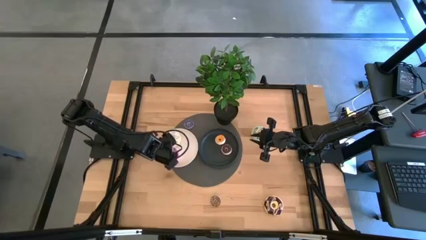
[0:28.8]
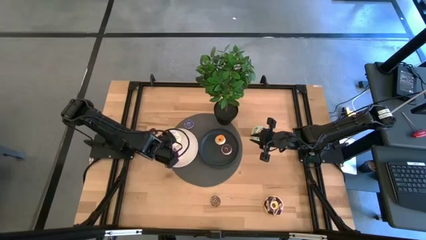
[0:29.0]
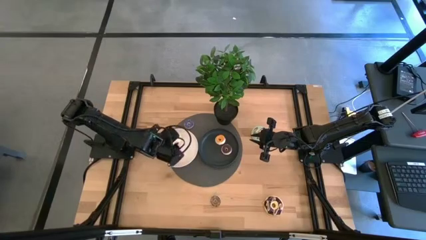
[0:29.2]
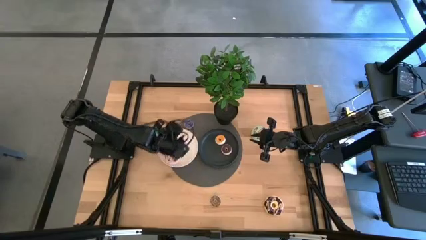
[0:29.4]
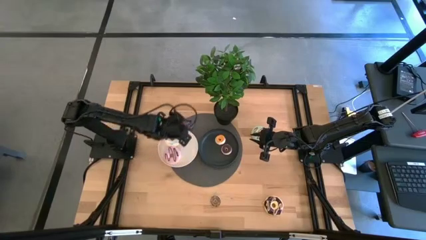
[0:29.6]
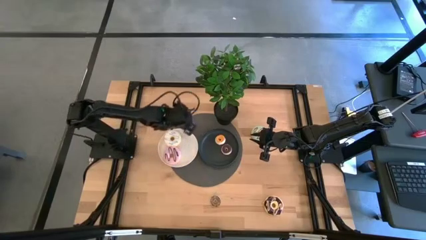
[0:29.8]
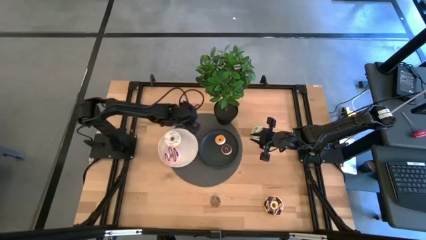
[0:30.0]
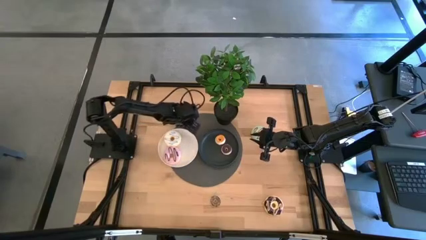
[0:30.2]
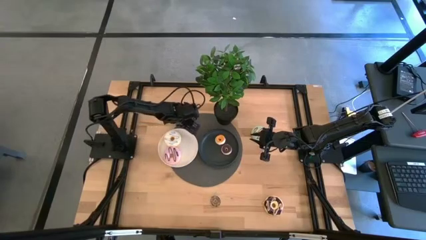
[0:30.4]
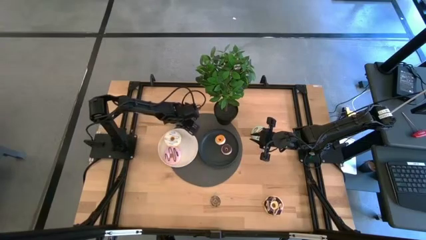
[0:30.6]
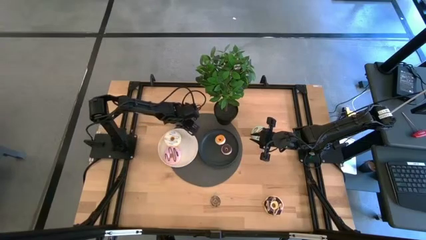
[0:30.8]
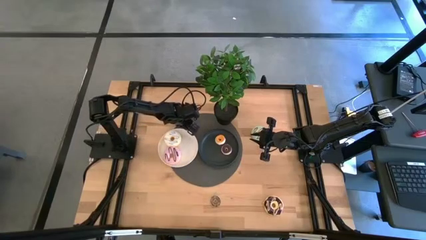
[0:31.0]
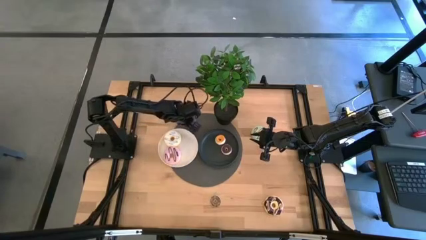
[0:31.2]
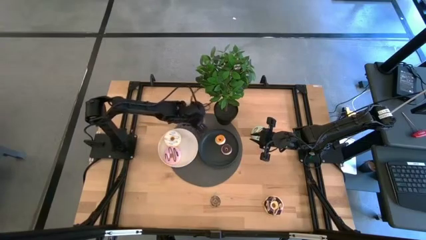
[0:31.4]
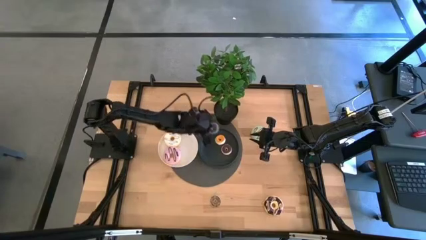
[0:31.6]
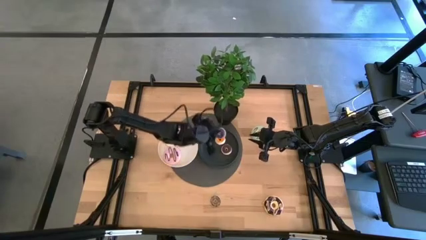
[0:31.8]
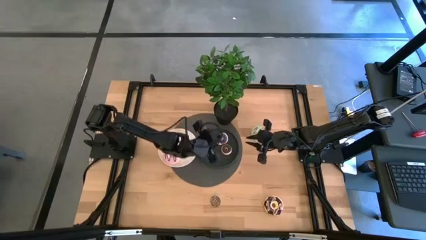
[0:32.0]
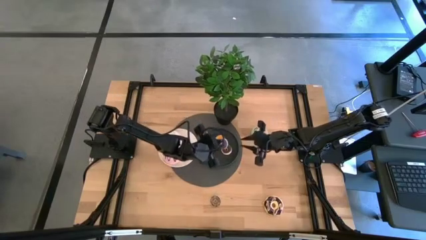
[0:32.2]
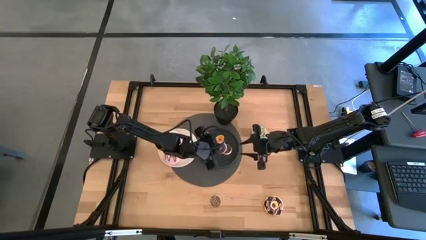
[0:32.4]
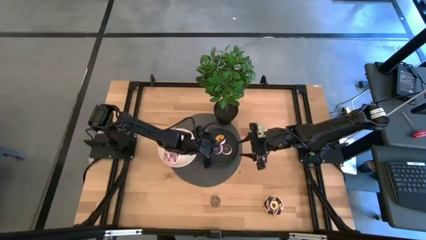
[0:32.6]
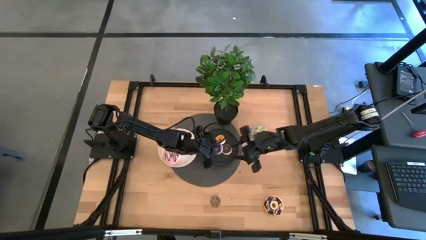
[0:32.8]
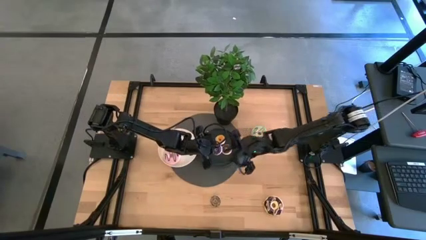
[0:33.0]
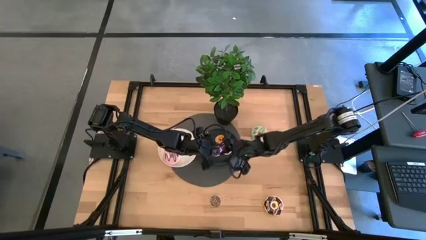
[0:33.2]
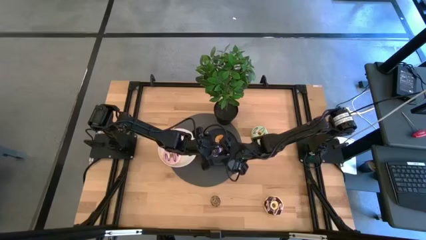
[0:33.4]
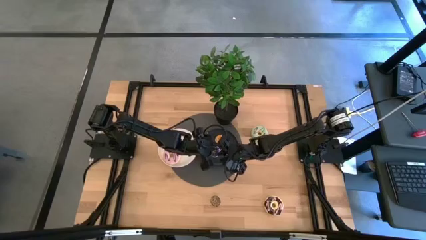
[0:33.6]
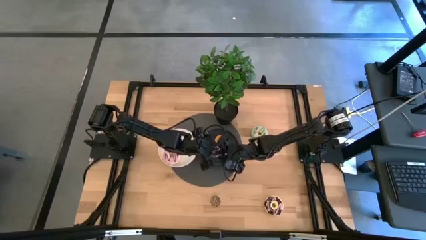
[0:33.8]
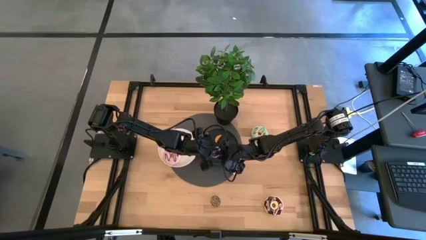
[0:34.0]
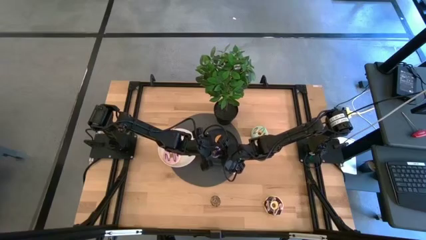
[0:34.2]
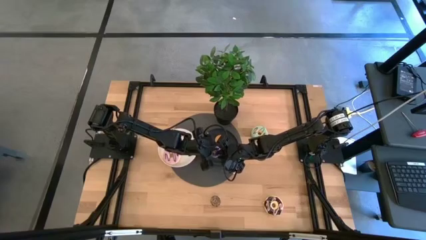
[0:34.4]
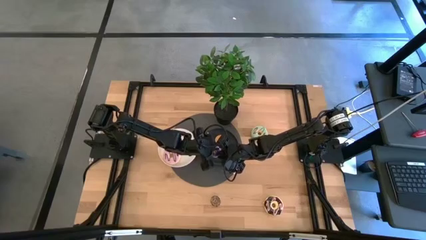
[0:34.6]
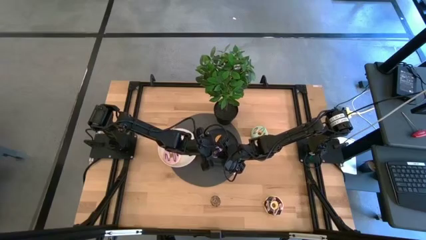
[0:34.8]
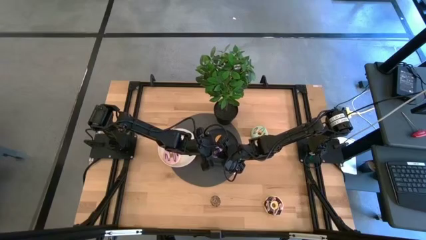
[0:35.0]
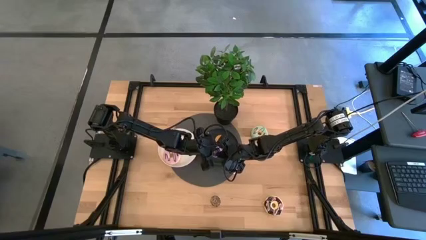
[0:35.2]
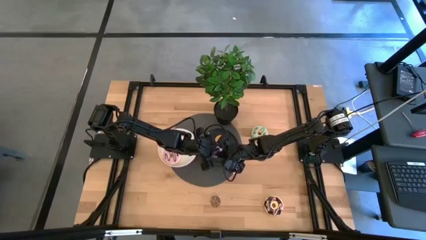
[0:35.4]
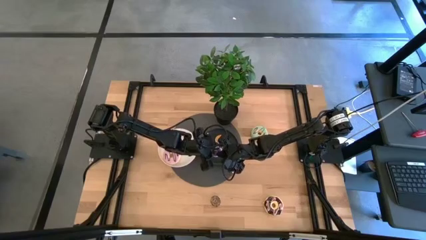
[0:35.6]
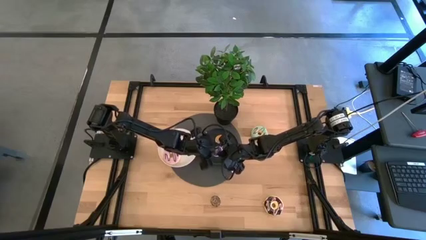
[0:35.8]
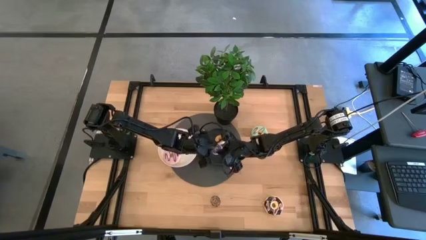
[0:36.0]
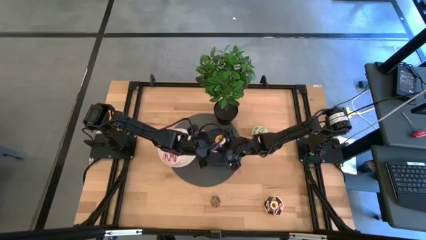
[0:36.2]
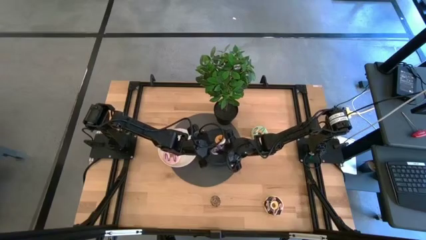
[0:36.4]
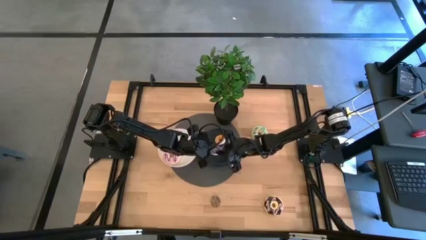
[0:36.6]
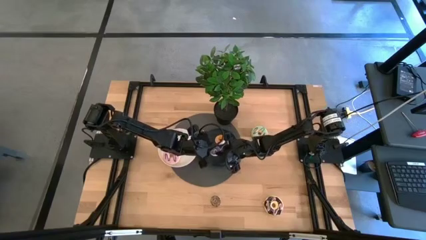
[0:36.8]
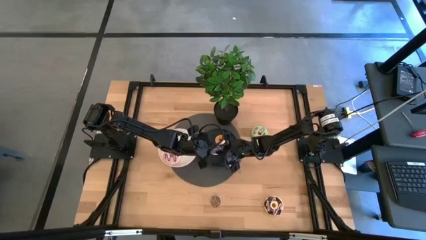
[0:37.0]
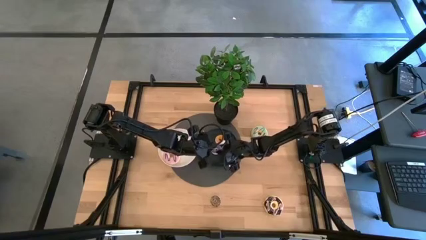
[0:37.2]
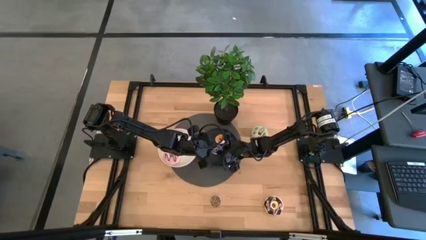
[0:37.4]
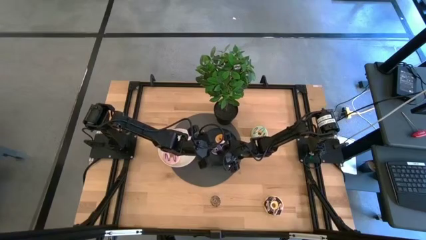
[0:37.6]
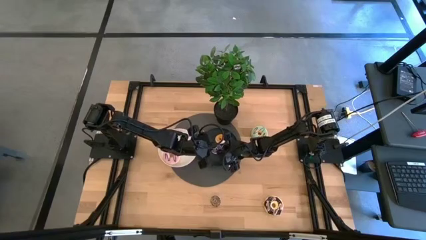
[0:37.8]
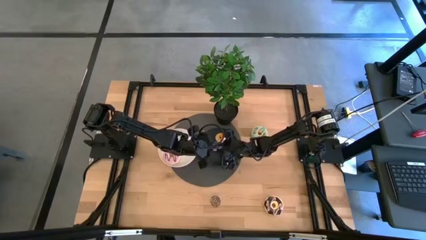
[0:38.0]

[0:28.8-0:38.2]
Task: Pick & Place donuts
Put the small blue donut on the black plate

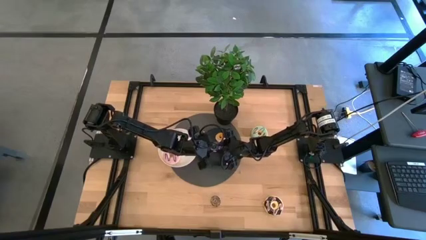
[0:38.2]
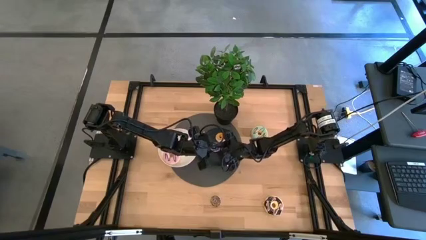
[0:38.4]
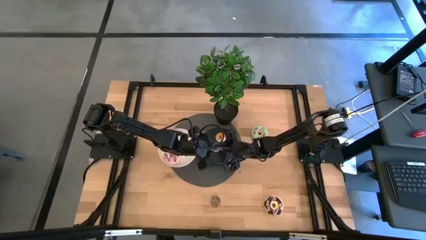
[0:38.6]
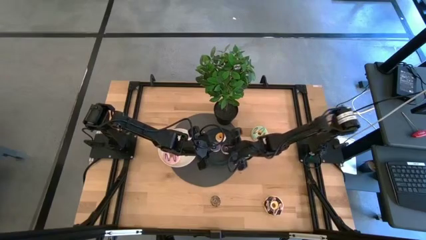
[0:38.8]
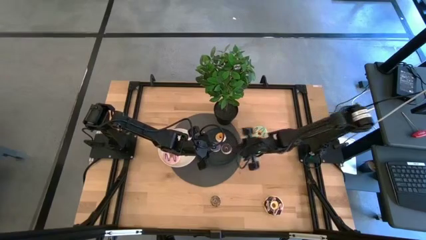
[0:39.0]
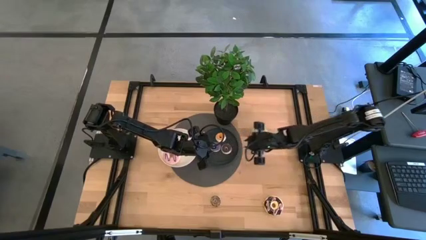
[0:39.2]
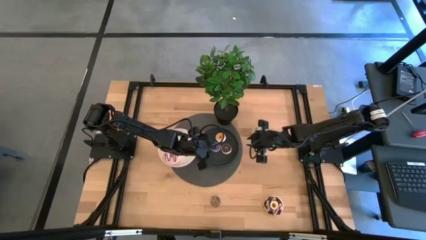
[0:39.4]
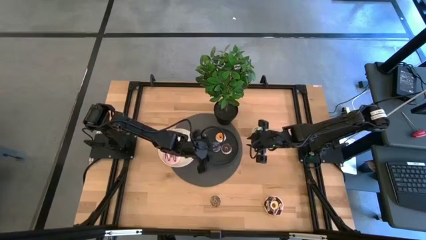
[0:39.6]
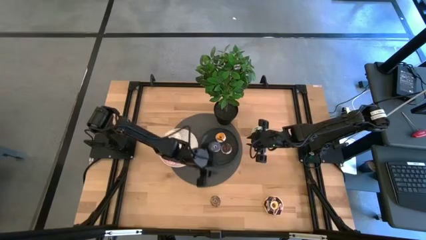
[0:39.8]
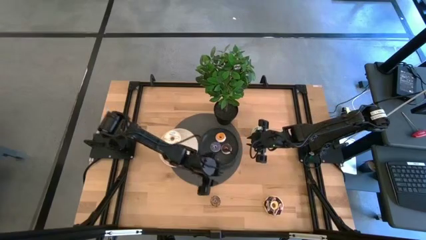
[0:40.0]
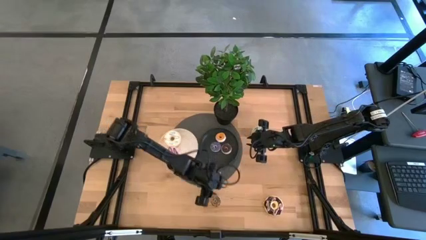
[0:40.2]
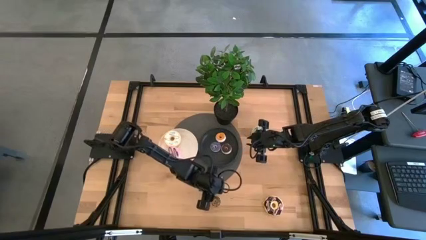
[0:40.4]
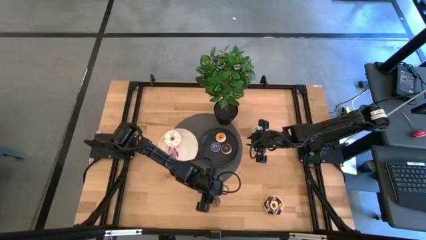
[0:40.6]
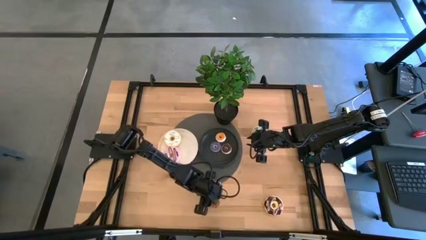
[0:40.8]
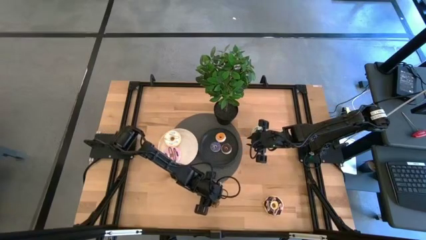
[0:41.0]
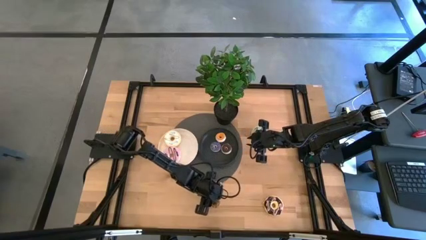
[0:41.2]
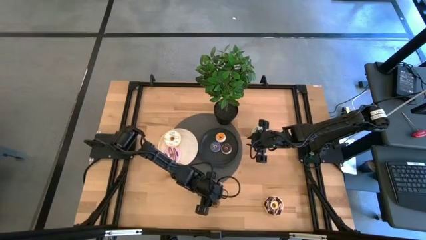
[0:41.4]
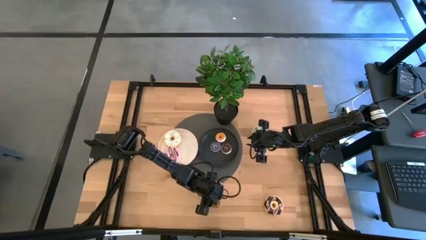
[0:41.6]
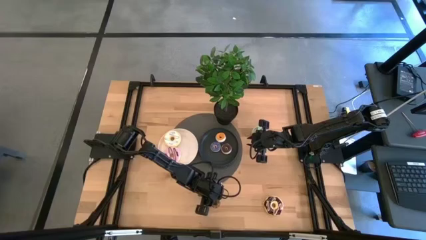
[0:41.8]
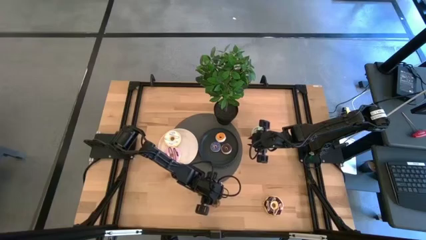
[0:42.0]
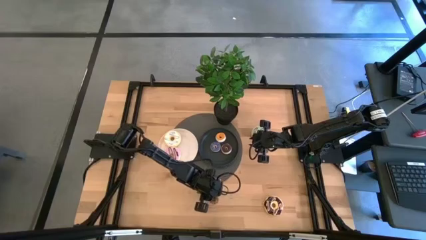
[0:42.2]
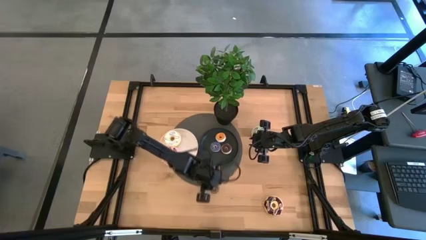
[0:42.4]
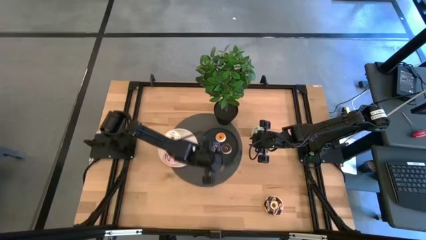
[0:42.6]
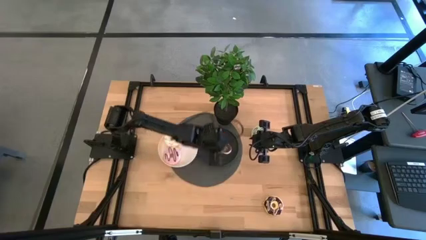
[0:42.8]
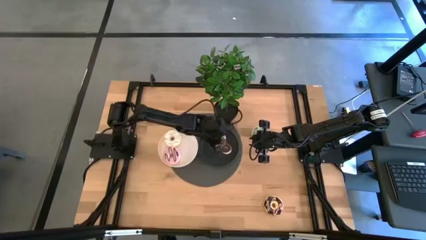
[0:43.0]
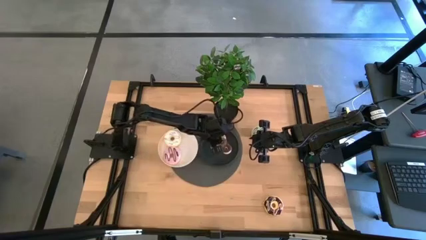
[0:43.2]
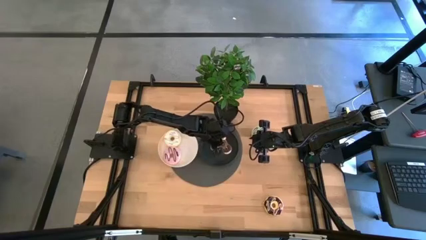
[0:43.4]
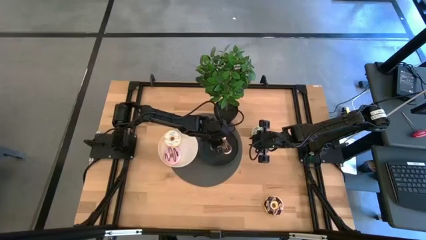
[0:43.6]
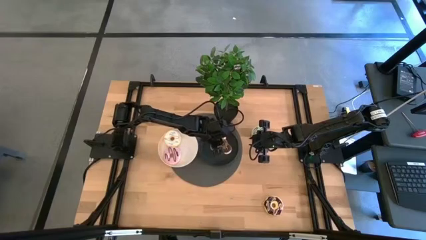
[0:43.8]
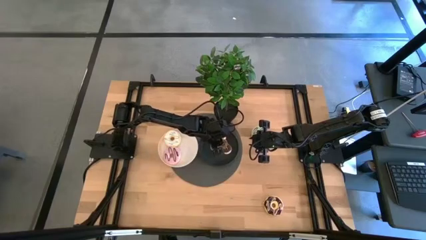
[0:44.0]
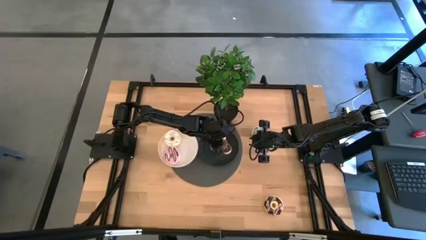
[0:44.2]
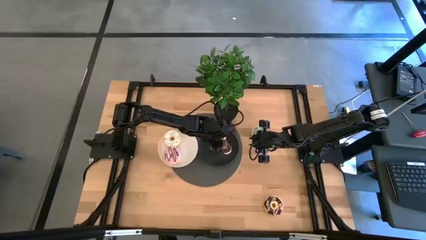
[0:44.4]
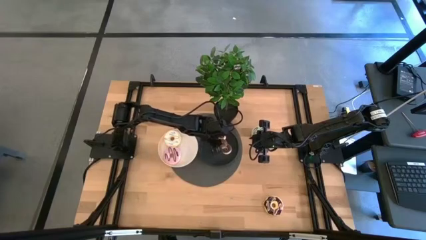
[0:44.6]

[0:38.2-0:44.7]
Put the small brown donut on the black plate
